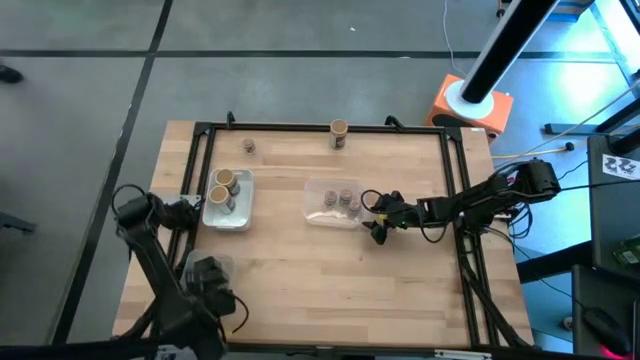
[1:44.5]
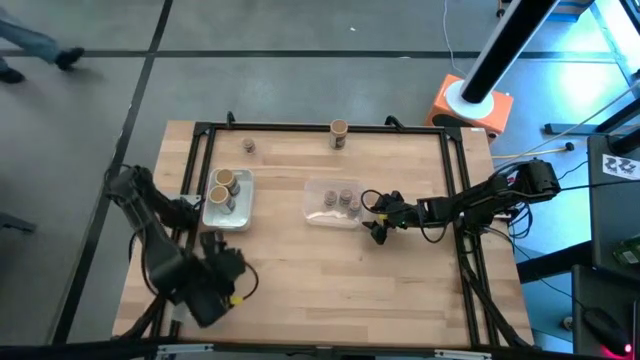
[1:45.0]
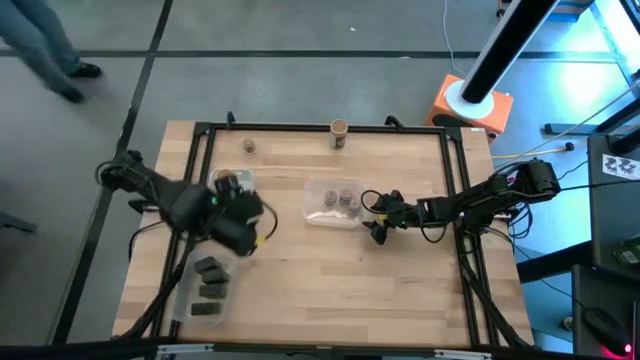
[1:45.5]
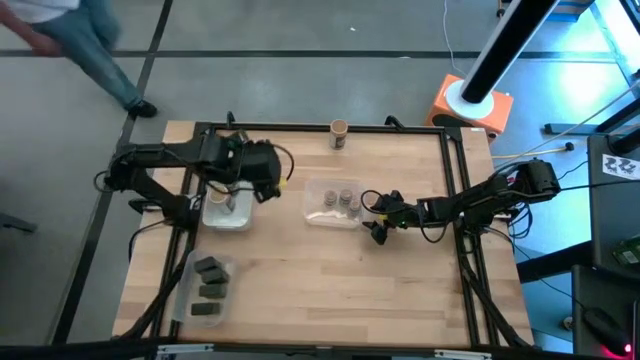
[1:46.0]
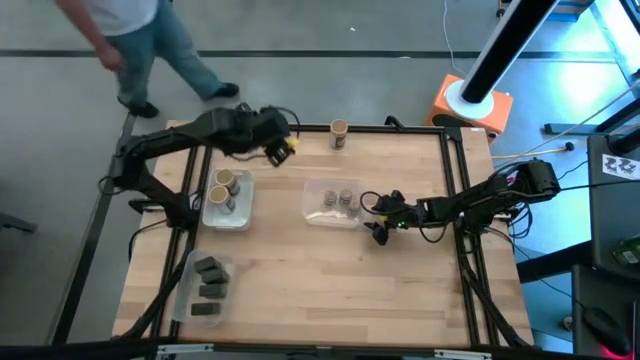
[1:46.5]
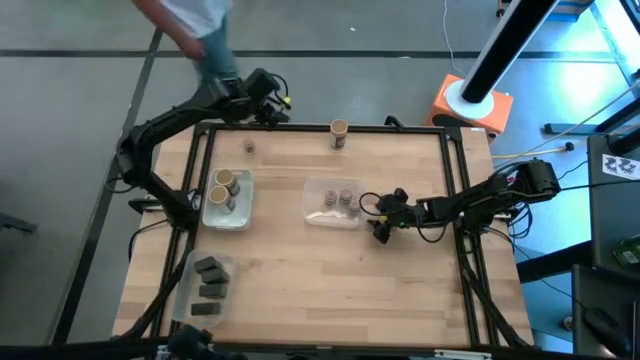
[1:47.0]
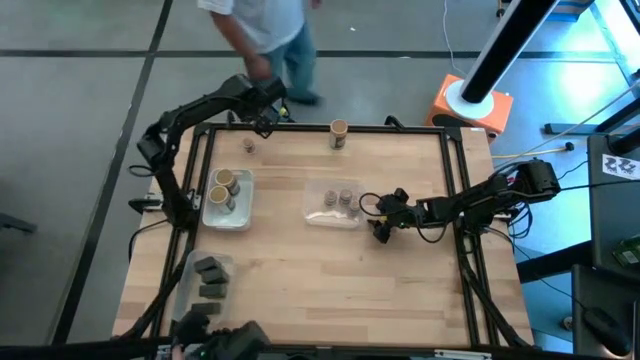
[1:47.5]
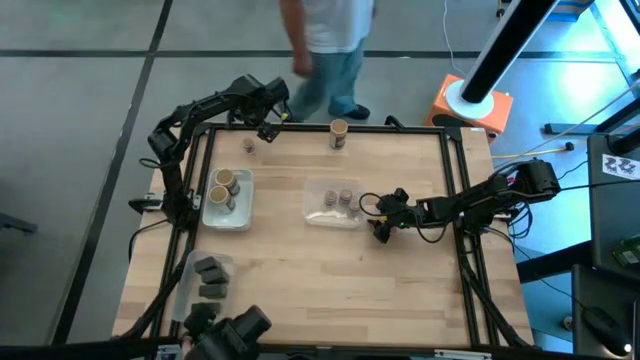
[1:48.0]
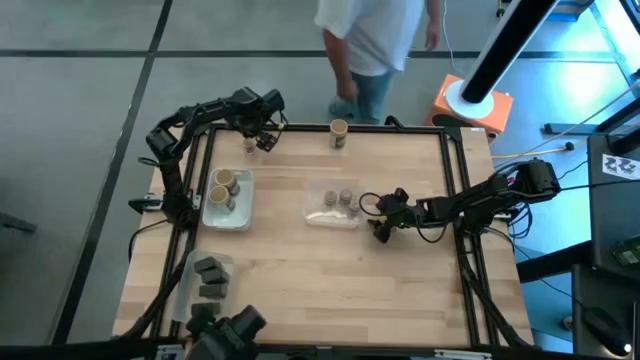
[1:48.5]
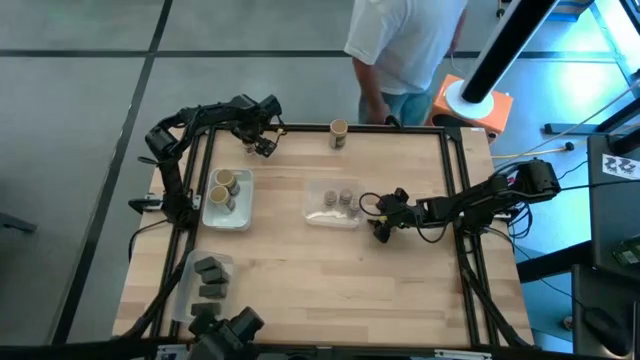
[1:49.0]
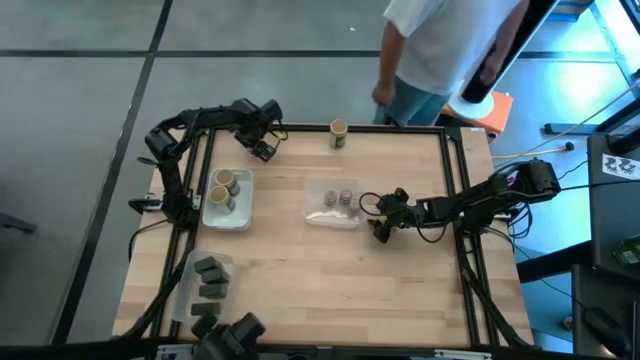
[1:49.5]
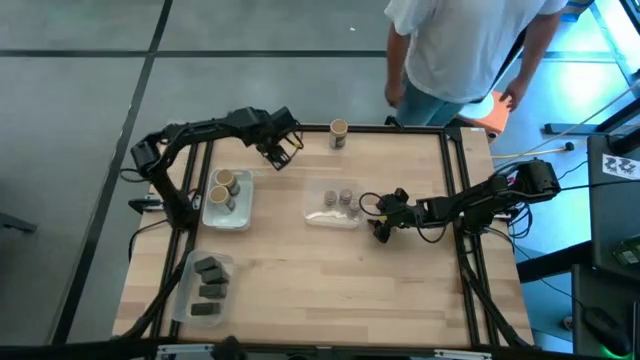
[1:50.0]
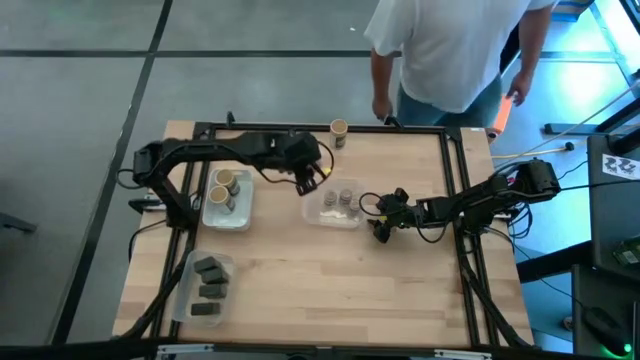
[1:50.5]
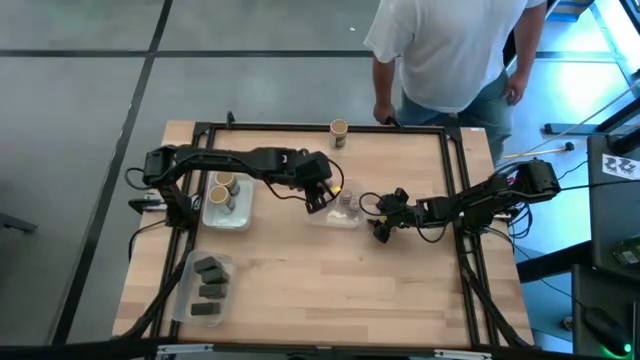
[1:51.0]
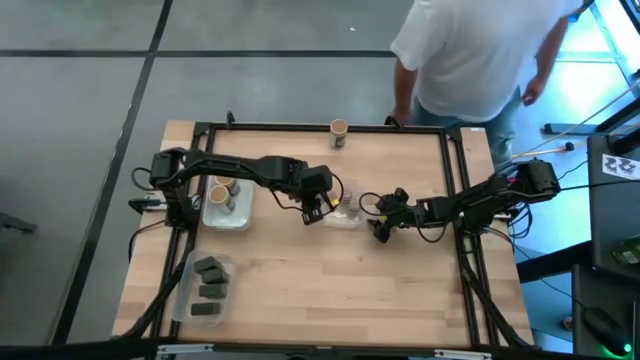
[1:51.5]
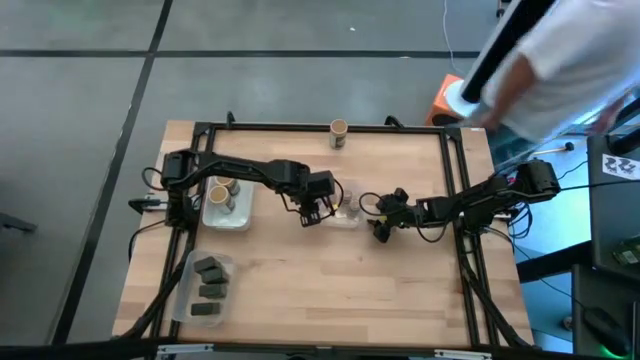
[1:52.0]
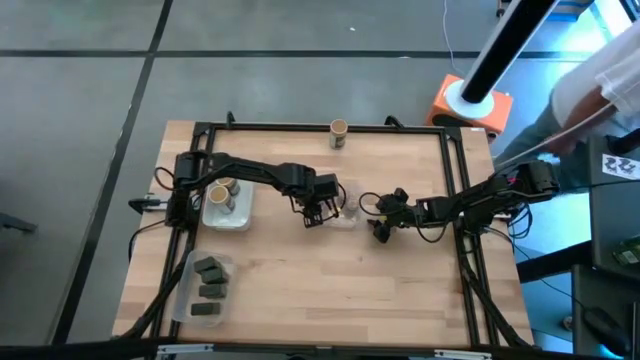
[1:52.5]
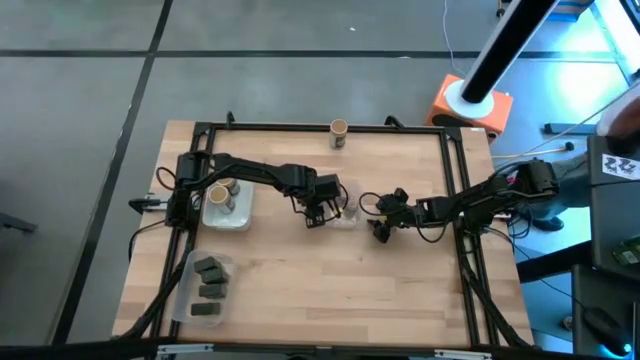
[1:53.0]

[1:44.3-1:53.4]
Task: Sort spices by type
Put the brown seasoning bottle into the top transparent bin

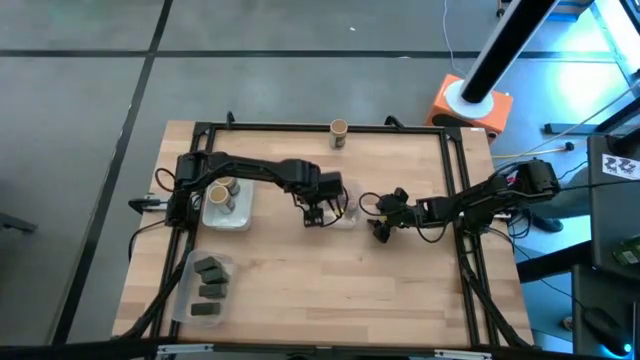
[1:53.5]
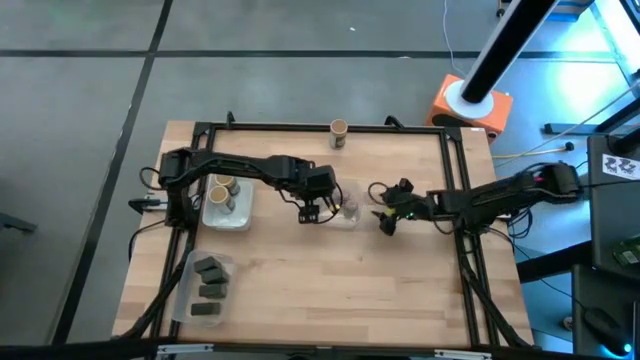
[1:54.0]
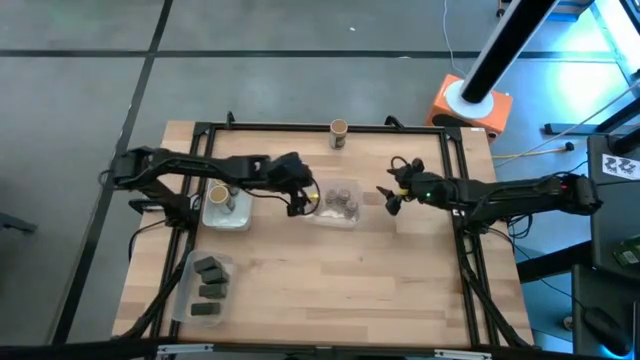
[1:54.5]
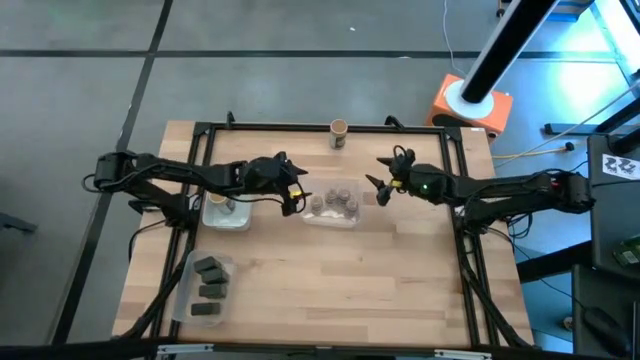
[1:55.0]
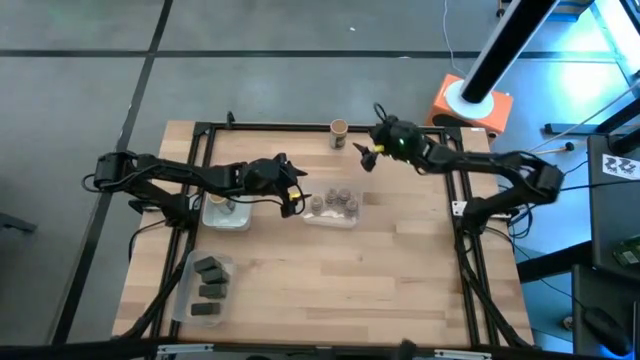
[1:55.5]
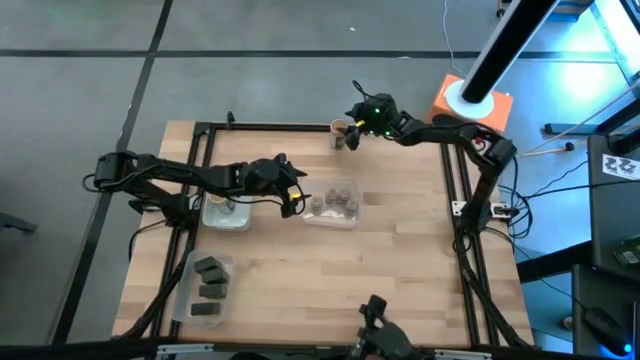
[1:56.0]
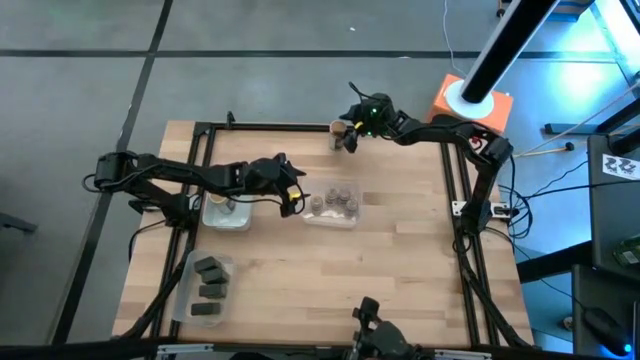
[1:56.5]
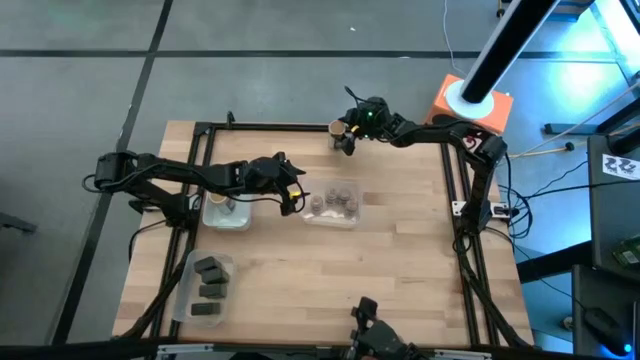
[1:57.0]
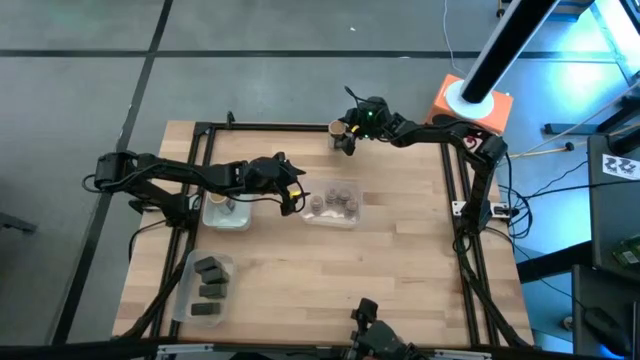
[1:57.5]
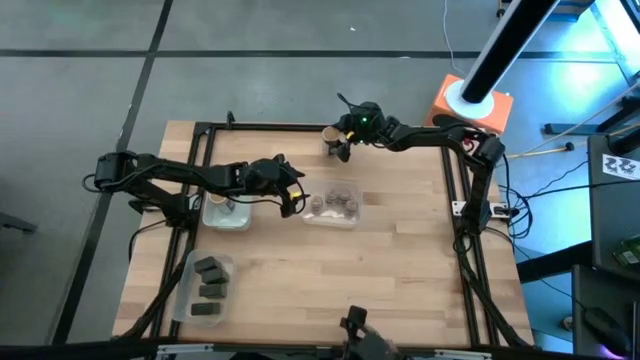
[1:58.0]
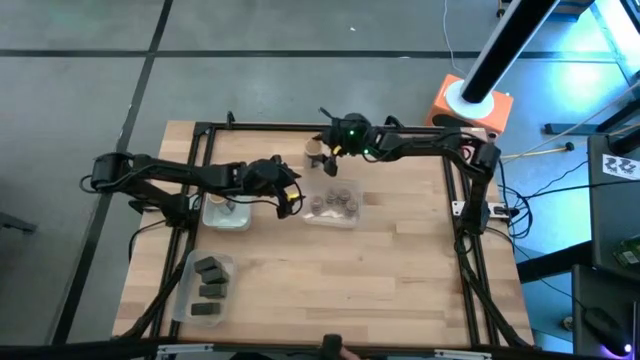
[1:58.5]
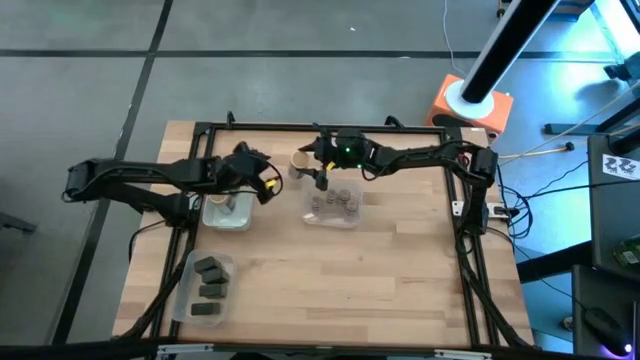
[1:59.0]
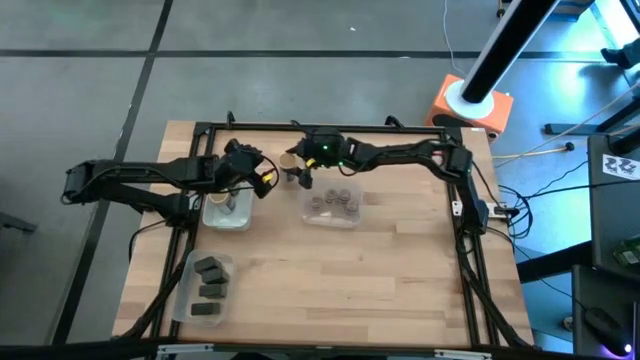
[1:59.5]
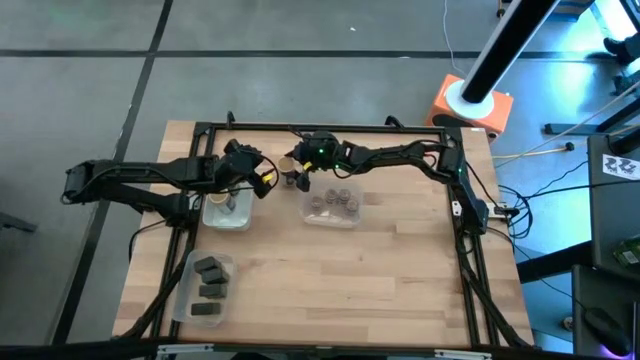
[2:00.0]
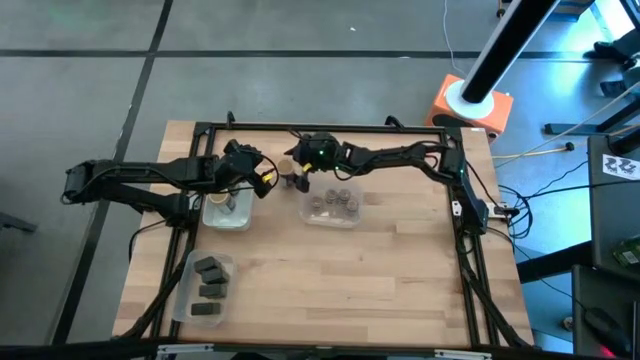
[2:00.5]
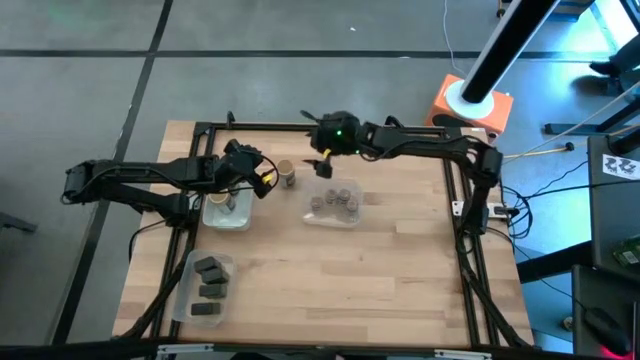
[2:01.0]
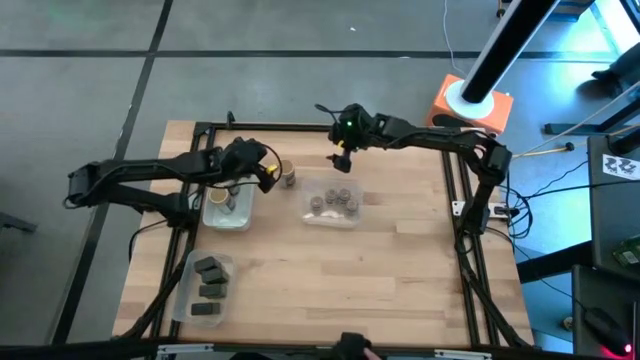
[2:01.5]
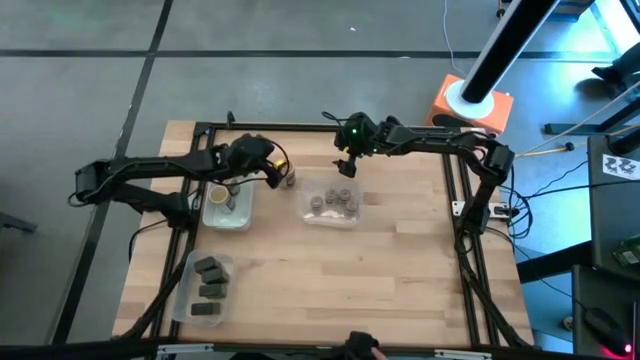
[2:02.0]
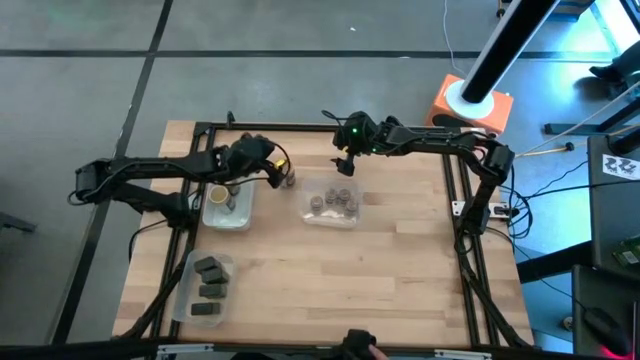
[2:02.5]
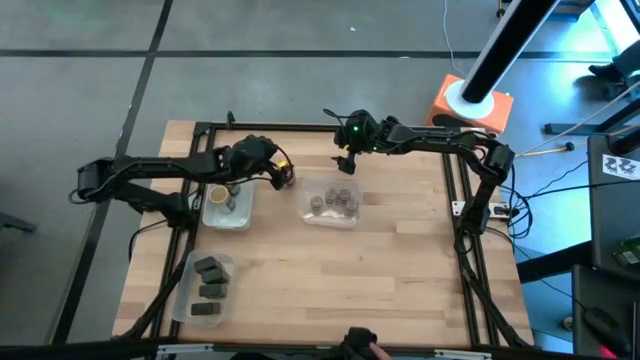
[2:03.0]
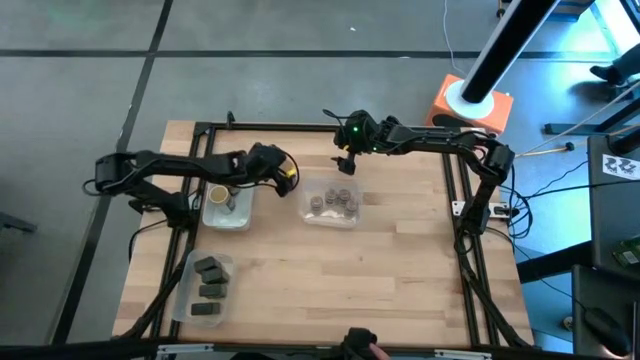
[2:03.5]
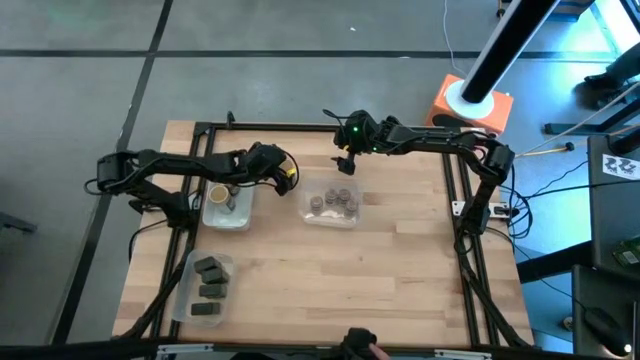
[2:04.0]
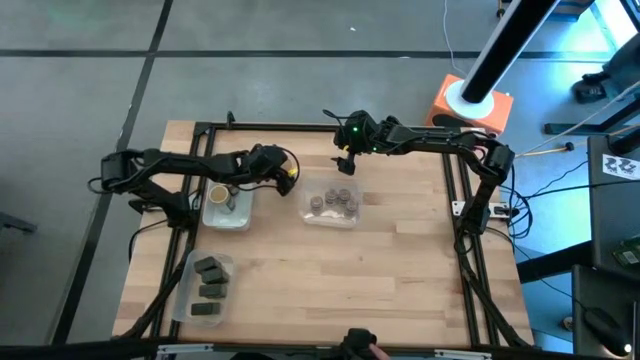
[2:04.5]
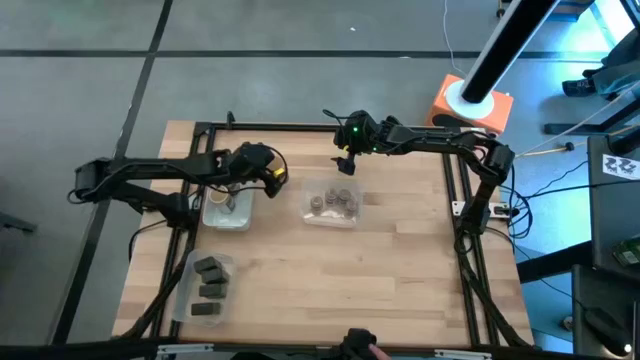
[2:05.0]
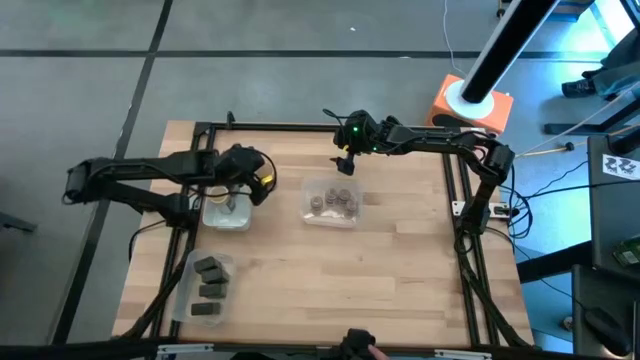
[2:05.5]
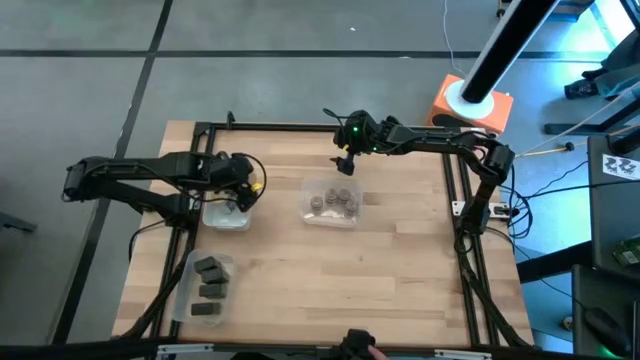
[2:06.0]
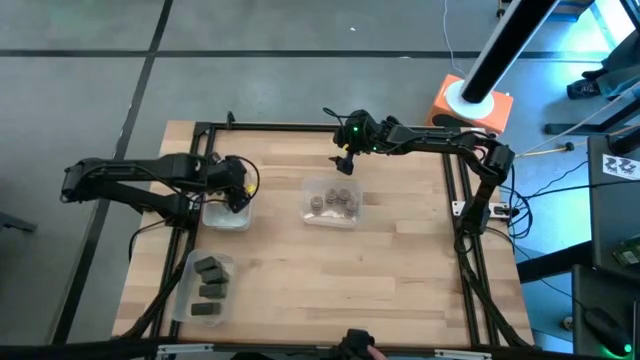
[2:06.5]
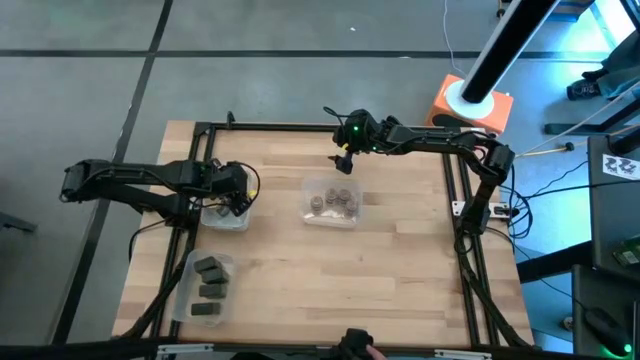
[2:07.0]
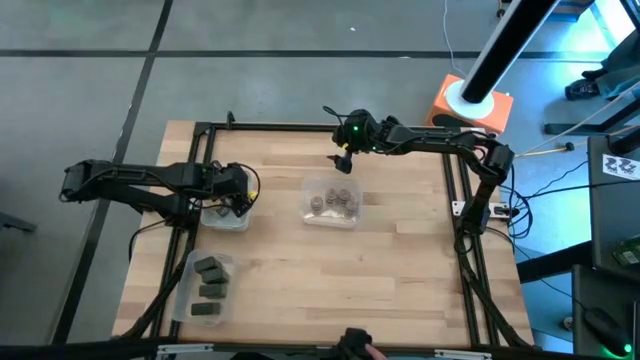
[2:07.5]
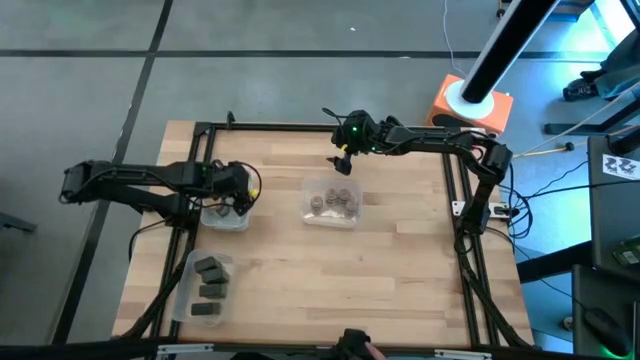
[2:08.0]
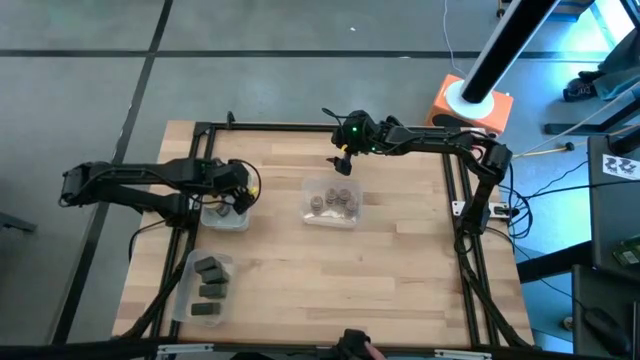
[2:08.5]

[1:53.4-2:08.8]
Put the gold seasoning bottle into the white bin
